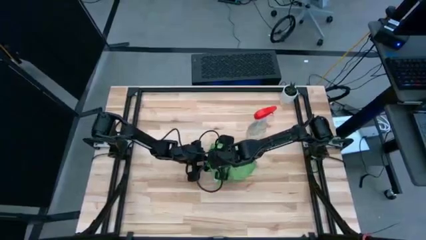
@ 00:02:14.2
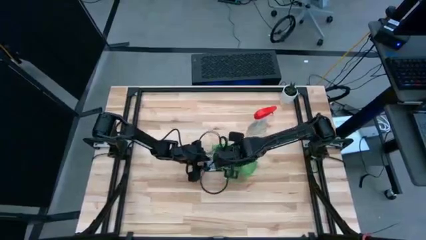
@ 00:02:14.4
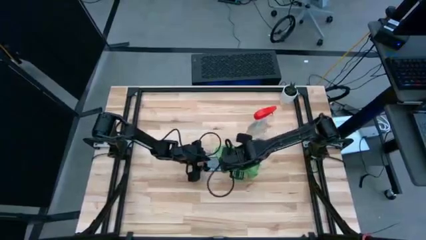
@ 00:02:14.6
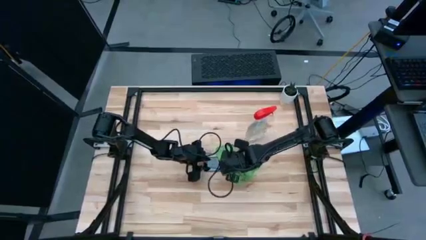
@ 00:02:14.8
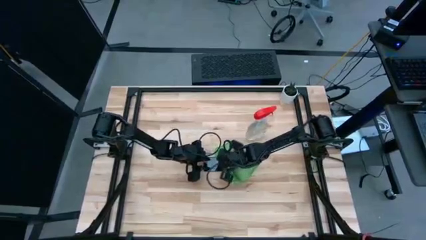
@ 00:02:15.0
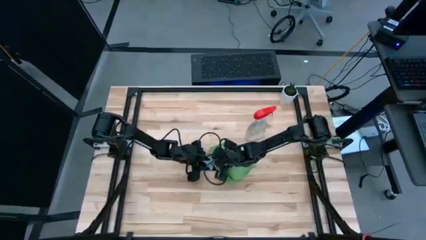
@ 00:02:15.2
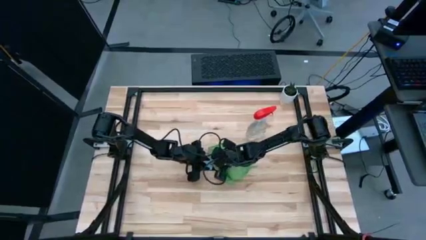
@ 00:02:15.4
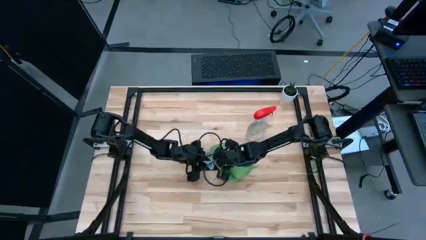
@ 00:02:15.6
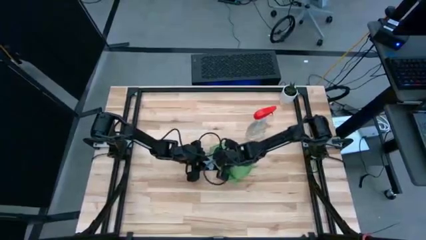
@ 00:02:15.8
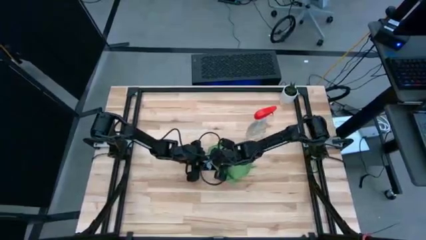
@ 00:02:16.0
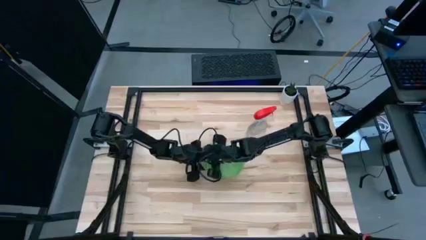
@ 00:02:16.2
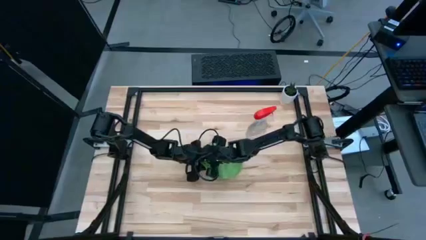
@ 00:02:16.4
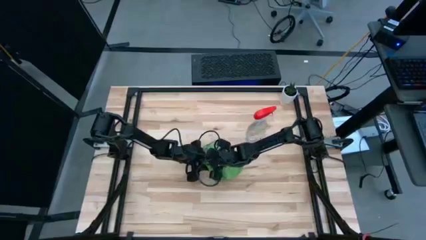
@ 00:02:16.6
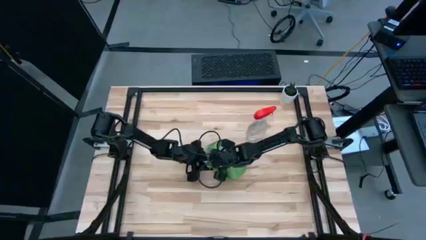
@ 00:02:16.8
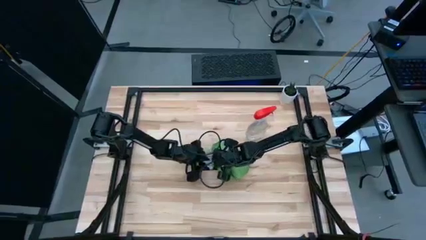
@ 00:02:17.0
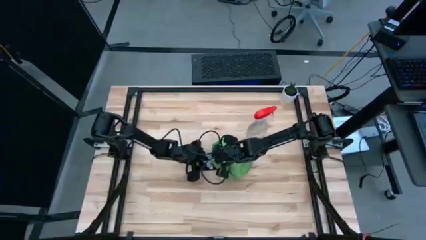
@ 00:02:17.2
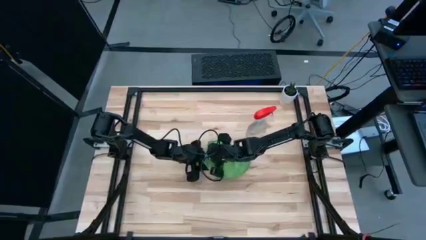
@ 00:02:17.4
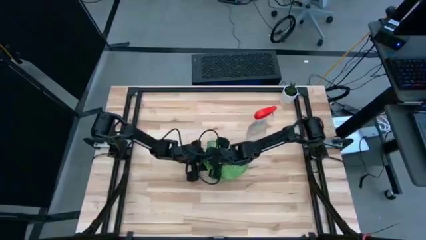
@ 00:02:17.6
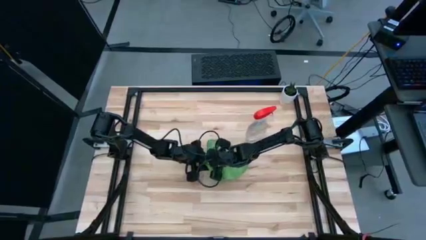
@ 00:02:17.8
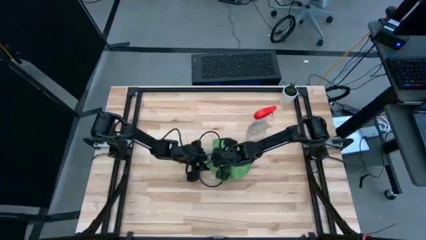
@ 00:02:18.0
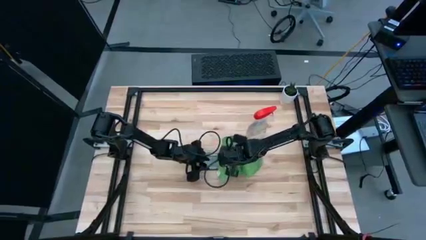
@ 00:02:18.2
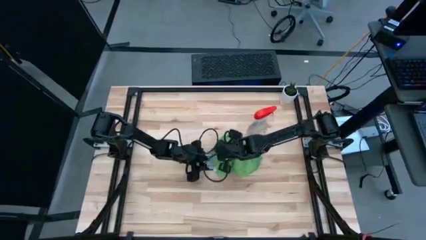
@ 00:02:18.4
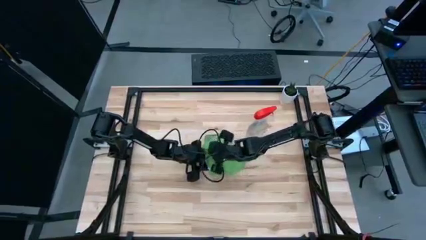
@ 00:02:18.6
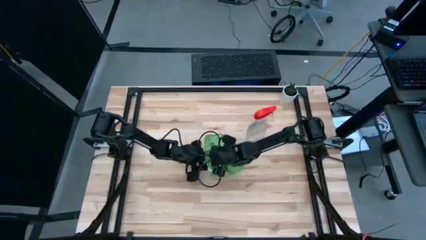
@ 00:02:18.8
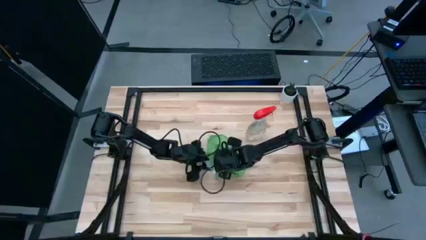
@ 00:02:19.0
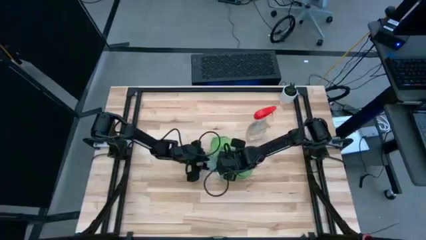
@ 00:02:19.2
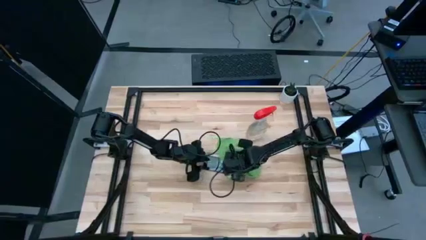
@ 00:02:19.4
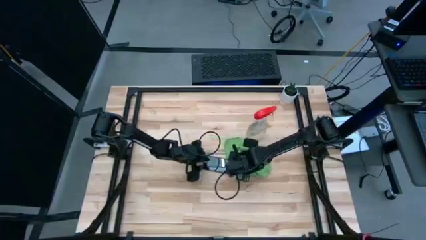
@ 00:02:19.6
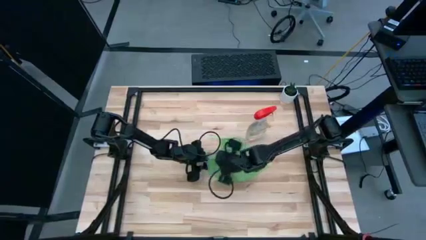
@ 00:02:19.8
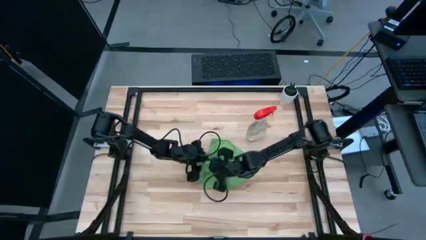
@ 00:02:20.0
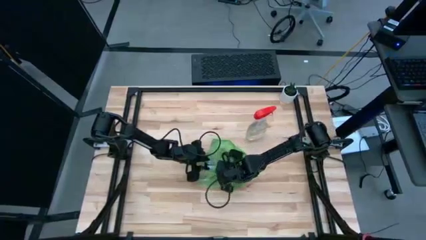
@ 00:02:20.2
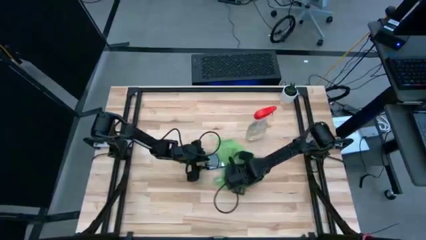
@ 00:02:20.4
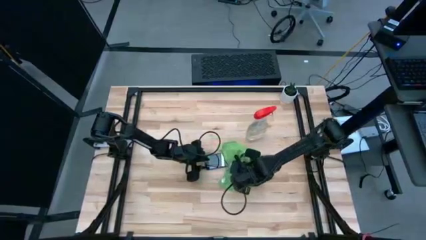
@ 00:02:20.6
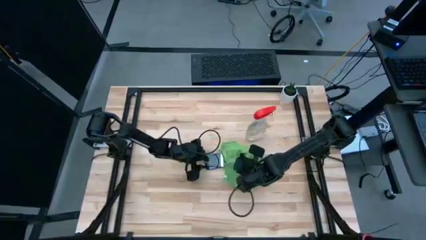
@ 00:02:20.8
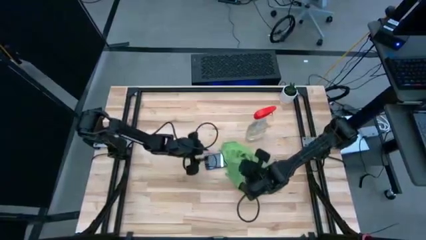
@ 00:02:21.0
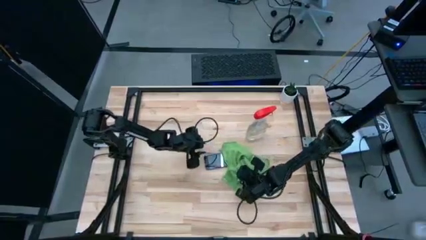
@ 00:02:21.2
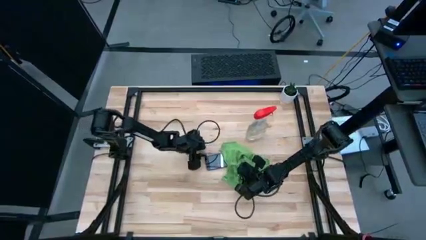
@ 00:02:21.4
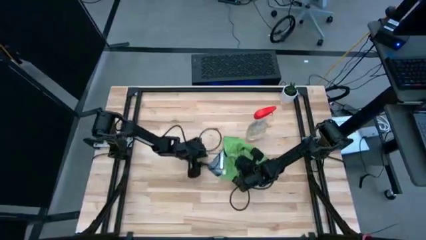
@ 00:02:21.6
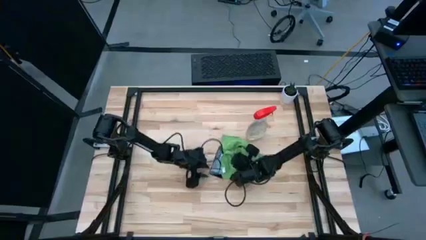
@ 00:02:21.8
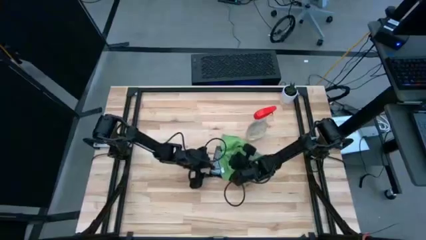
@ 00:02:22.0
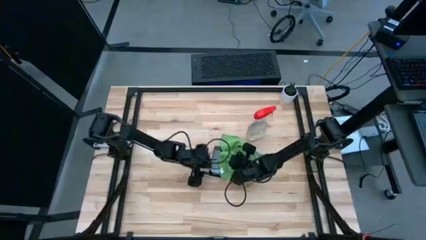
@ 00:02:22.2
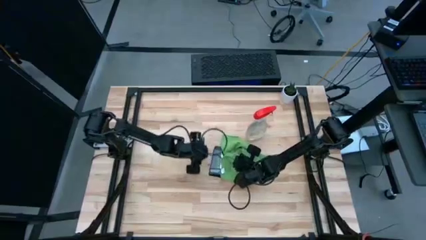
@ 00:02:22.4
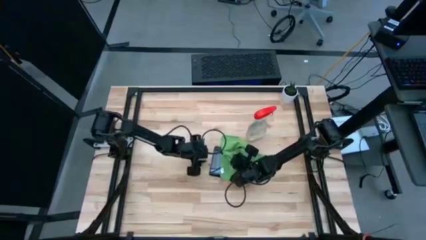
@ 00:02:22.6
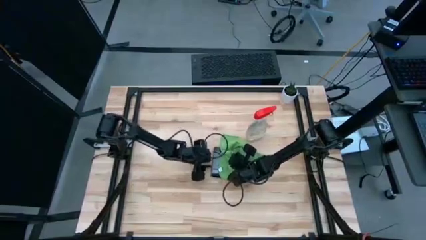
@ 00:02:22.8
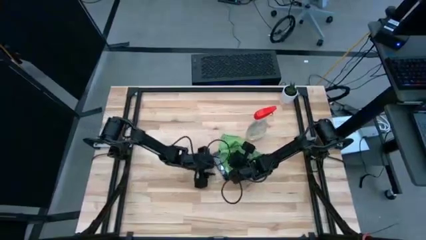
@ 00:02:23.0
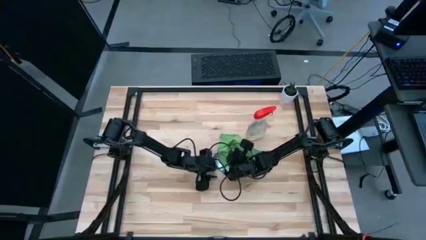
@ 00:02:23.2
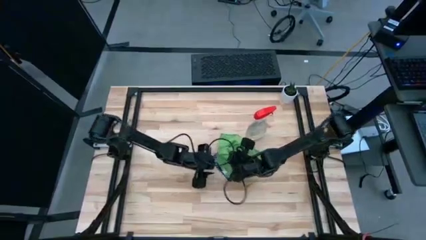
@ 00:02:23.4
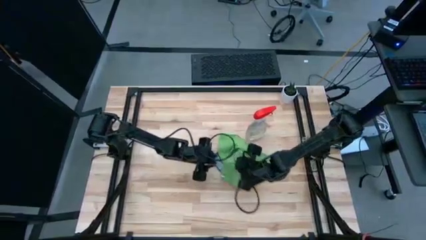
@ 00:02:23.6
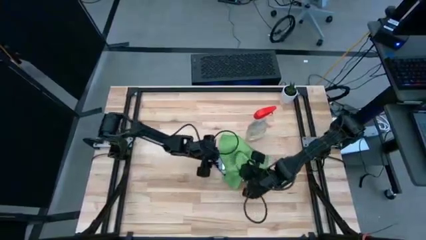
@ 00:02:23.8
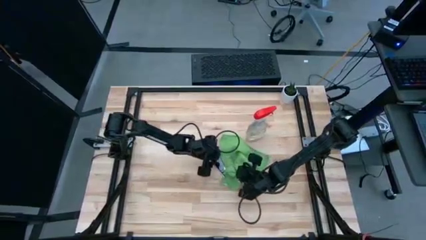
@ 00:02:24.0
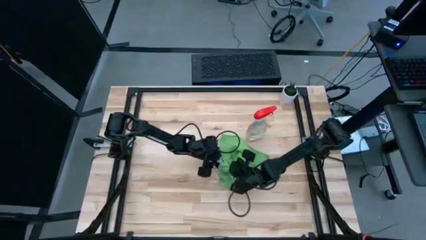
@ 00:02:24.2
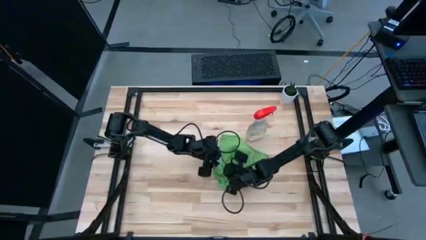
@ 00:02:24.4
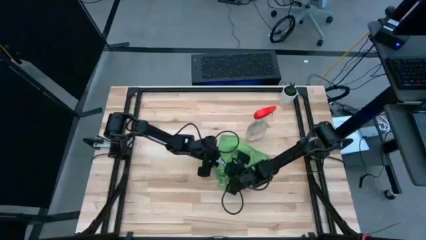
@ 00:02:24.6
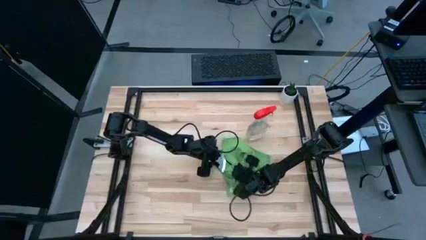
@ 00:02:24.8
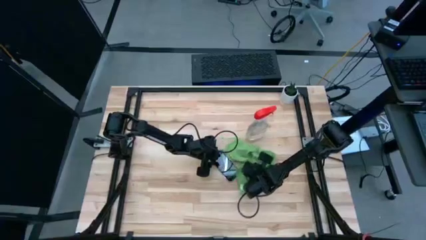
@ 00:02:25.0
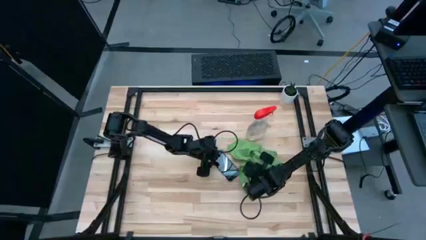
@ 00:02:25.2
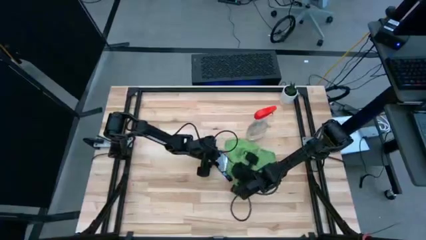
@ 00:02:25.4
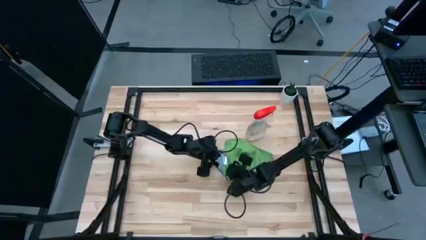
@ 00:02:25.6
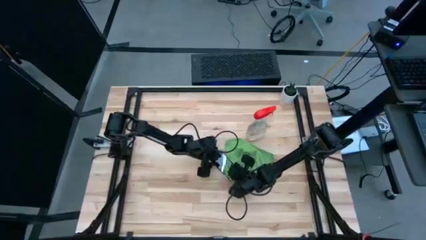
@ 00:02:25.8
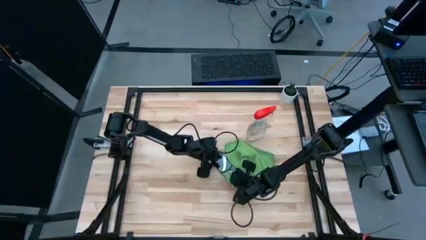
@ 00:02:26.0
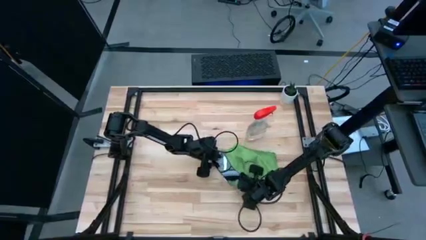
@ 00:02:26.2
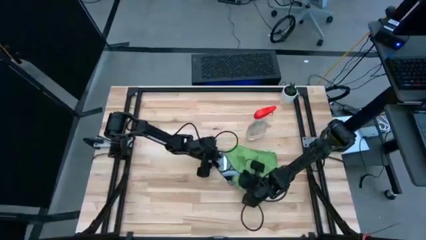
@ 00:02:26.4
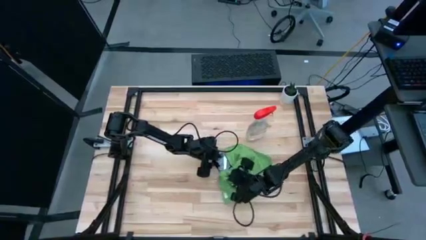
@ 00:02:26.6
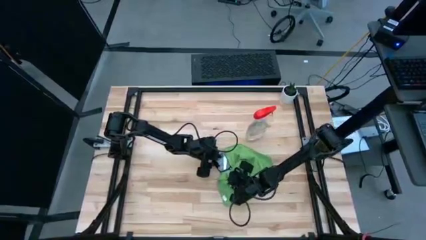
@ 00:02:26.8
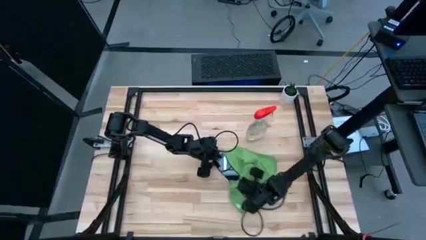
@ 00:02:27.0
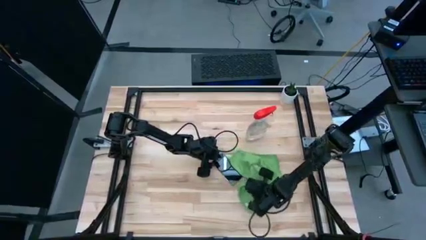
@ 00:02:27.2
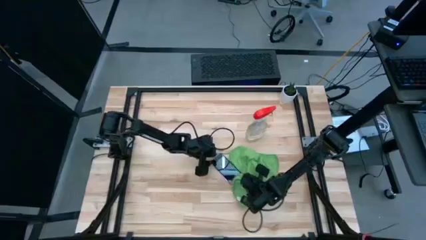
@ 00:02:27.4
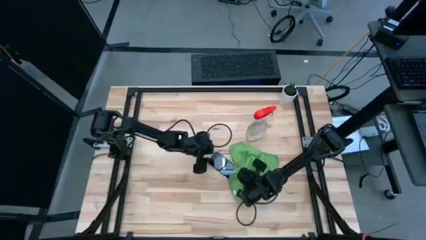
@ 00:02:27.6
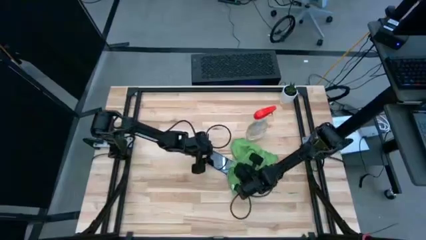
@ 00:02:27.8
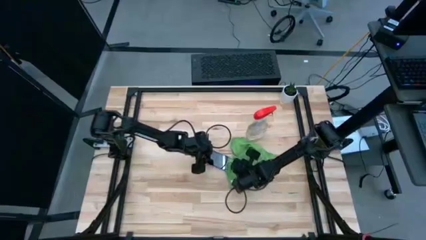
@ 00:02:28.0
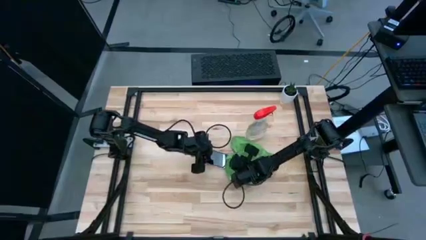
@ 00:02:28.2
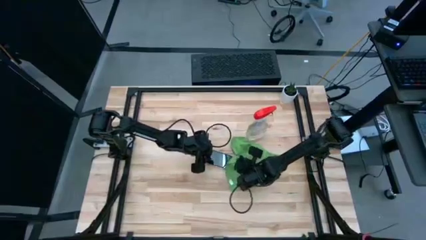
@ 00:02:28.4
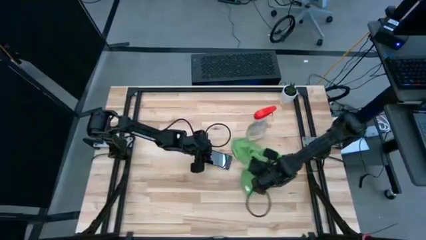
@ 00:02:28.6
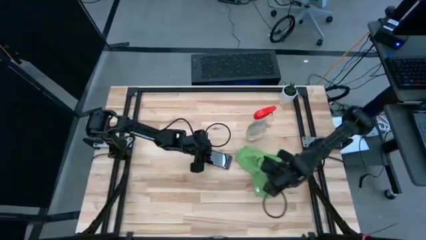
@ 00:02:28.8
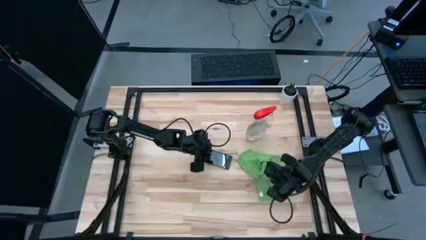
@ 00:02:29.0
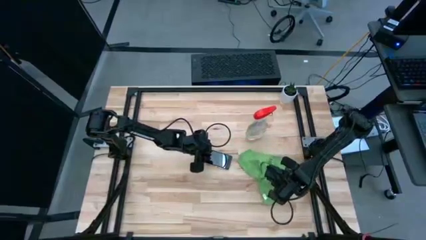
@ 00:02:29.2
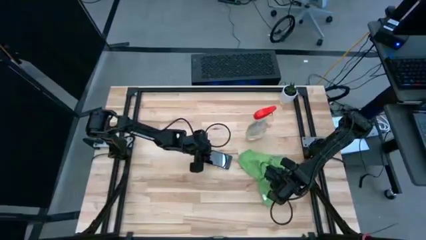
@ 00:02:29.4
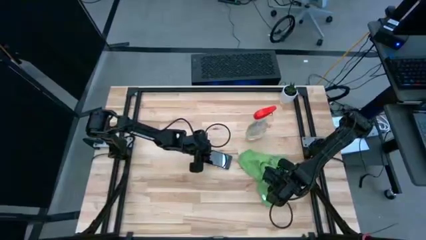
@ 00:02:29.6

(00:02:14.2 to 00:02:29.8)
Task: Apply microfiber cloth
Wipe the back and front of the cellphone with the green microfiber cloth

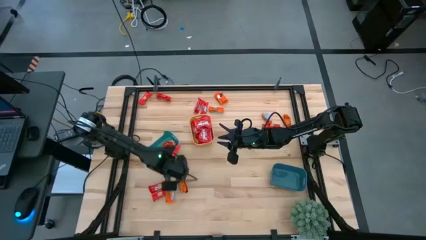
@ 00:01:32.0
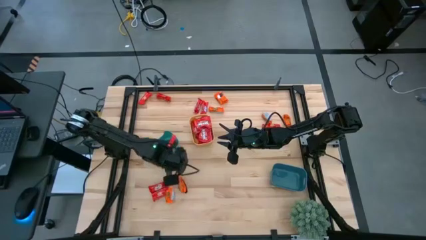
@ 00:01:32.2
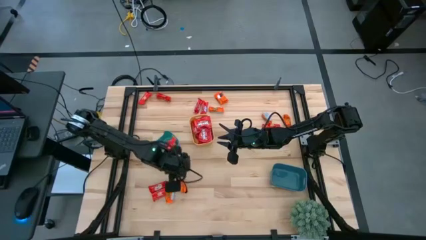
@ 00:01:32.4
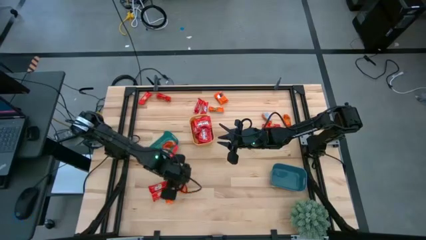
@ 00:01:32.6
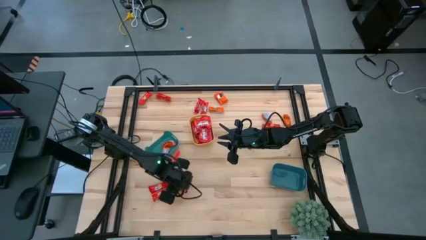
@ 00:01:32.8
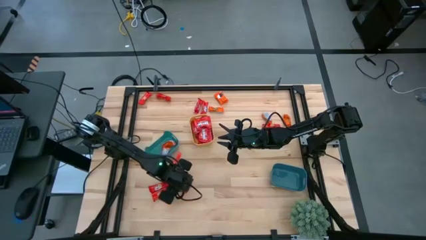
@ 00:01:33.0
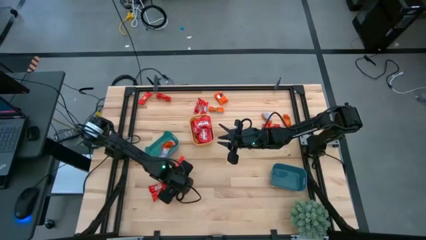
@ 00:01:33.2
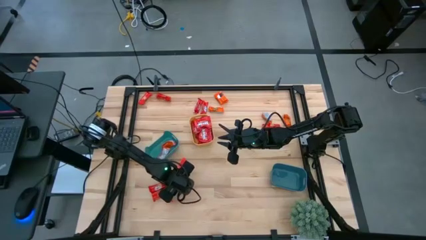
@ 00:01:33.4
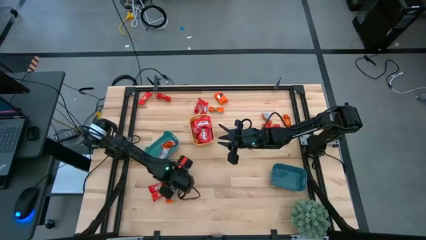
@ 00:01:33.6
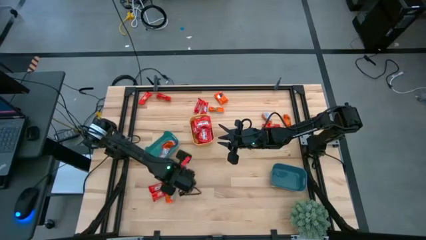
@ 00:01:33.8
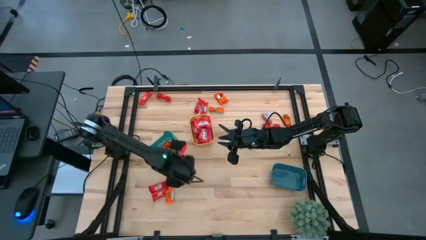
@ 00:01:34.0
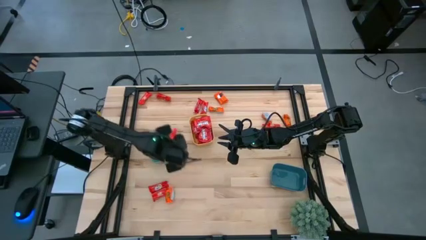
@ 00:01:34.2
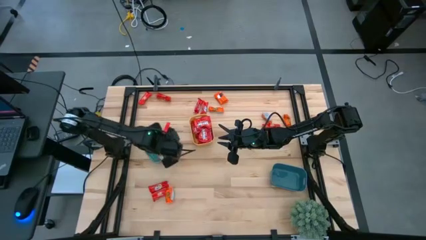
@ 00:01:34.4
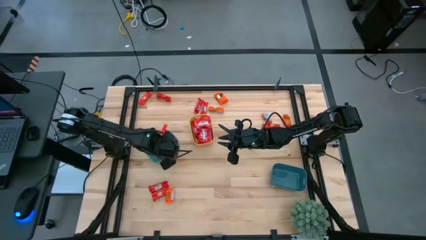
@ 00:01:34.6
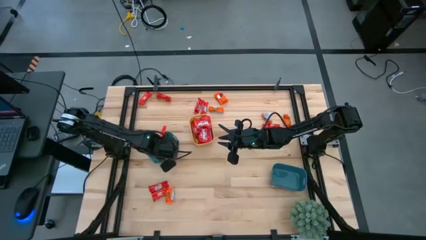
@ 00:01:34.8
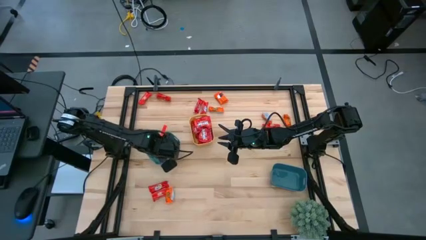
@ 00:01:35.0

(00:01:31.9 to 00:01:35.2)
Task: Sort candy
Put the orange candy into the green bin
